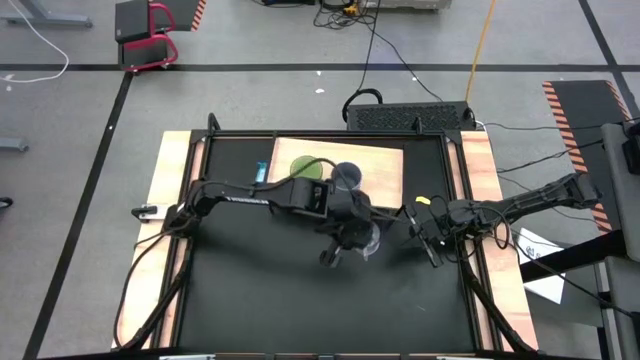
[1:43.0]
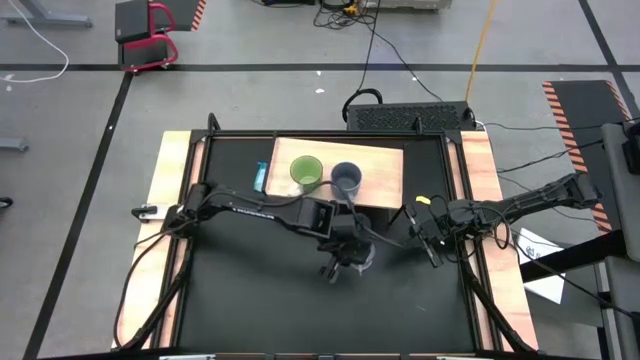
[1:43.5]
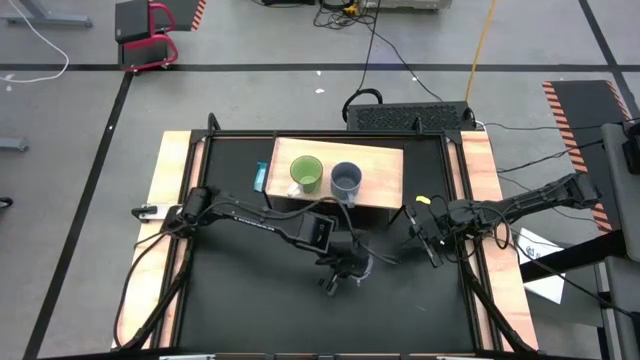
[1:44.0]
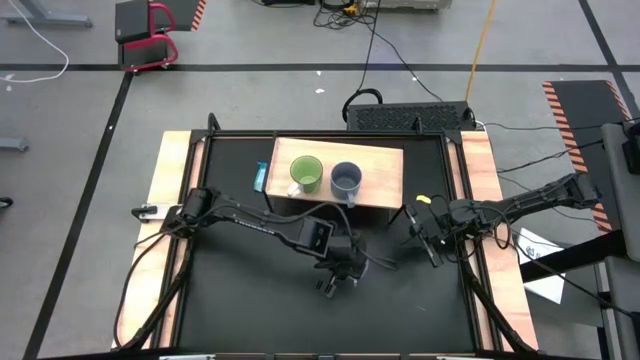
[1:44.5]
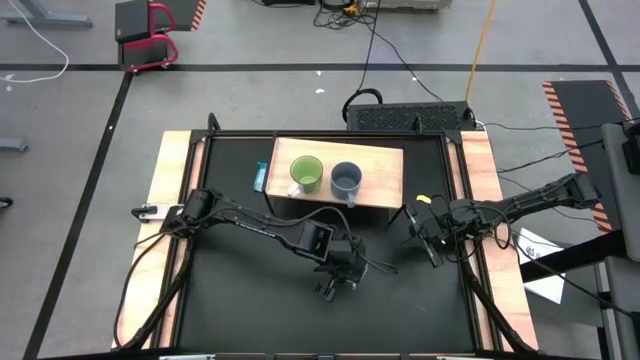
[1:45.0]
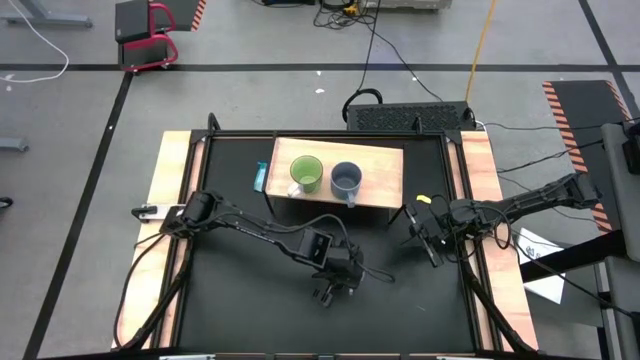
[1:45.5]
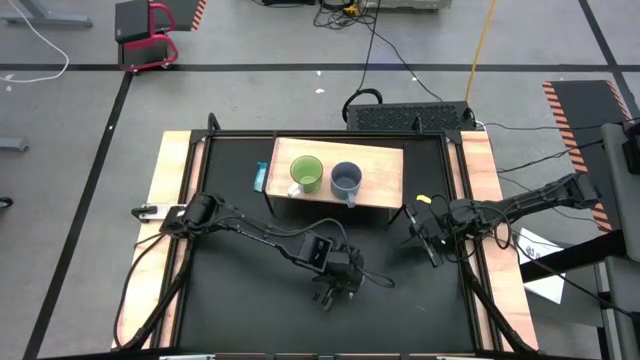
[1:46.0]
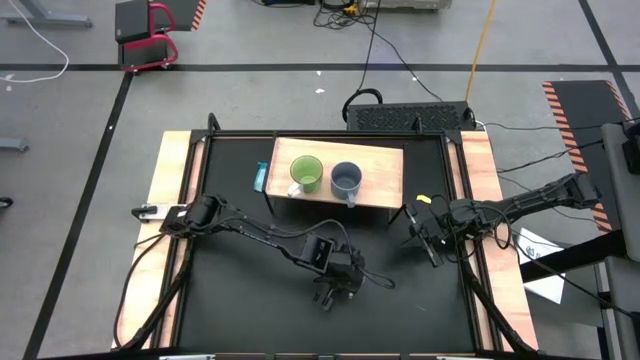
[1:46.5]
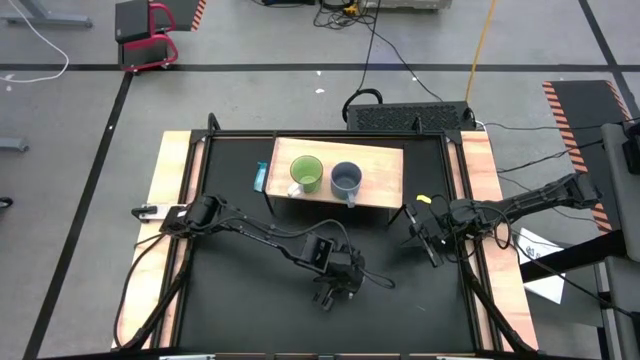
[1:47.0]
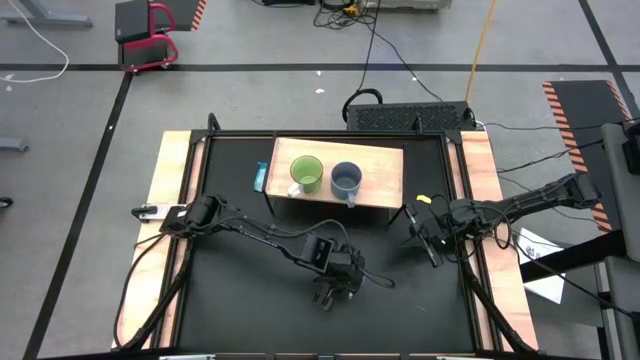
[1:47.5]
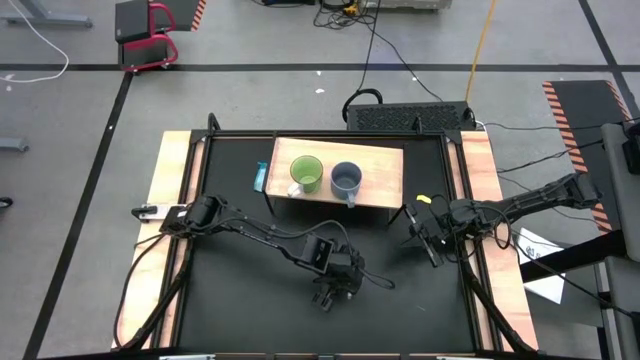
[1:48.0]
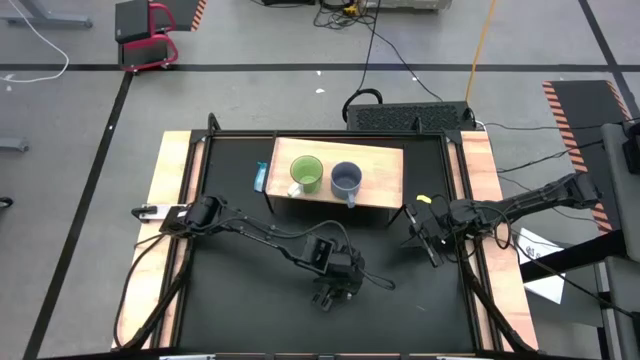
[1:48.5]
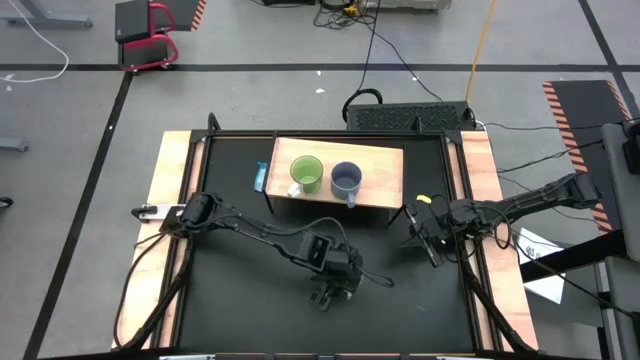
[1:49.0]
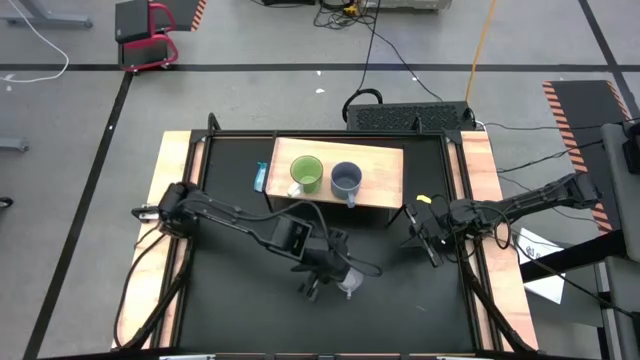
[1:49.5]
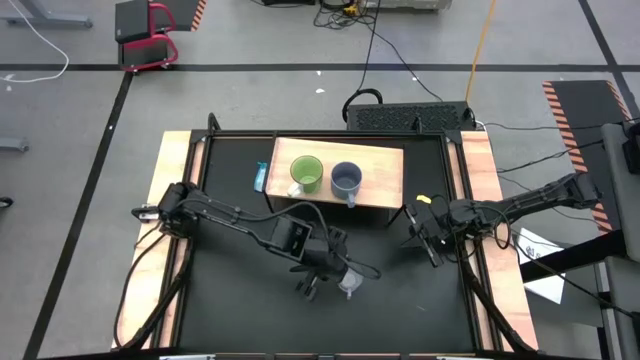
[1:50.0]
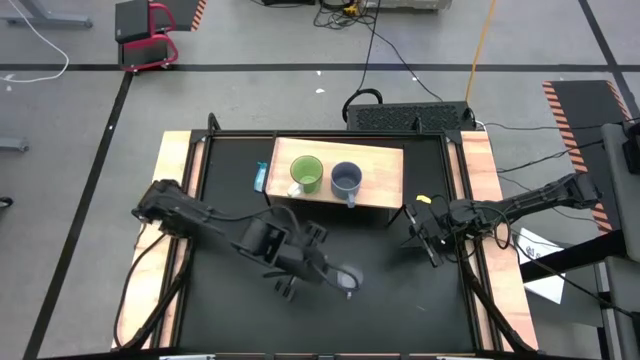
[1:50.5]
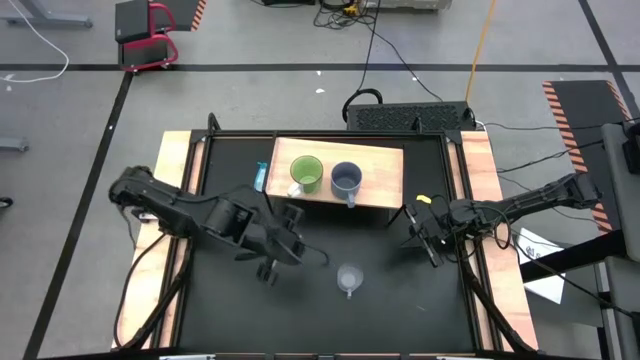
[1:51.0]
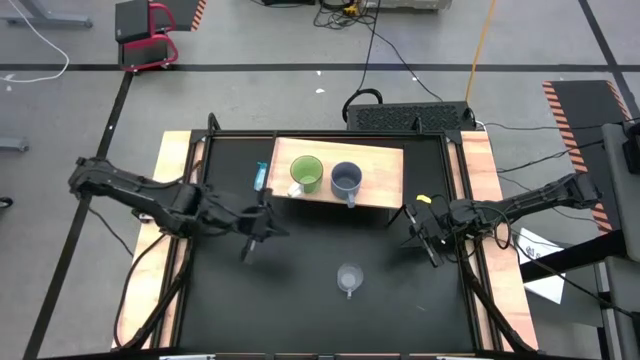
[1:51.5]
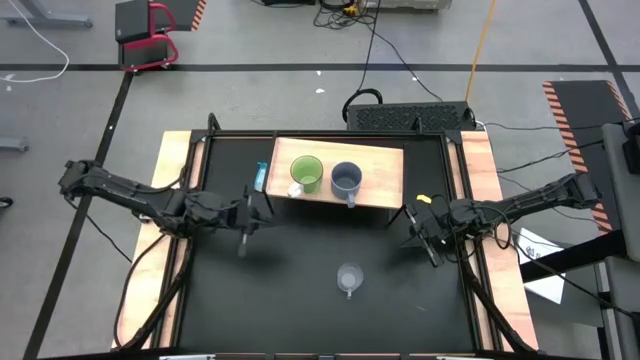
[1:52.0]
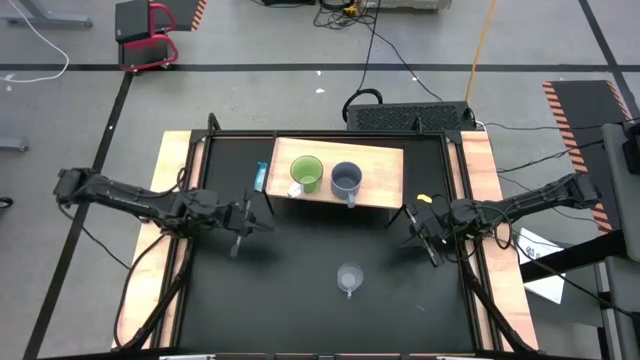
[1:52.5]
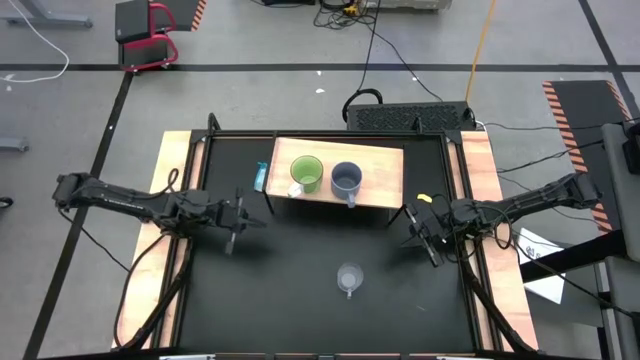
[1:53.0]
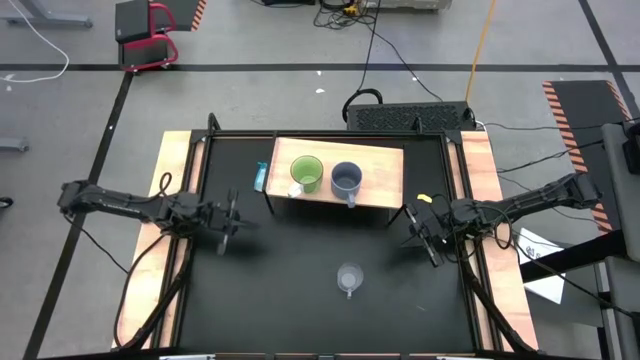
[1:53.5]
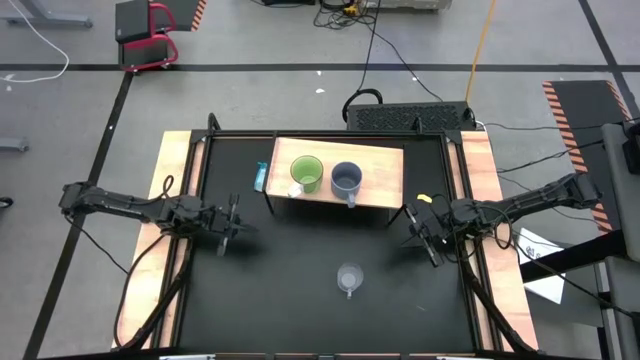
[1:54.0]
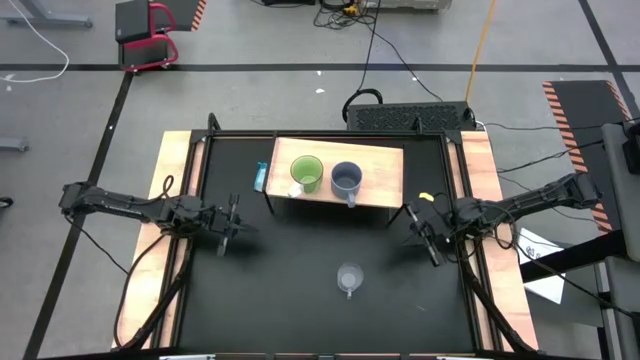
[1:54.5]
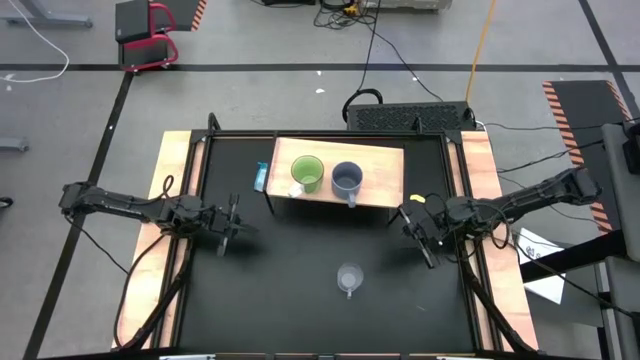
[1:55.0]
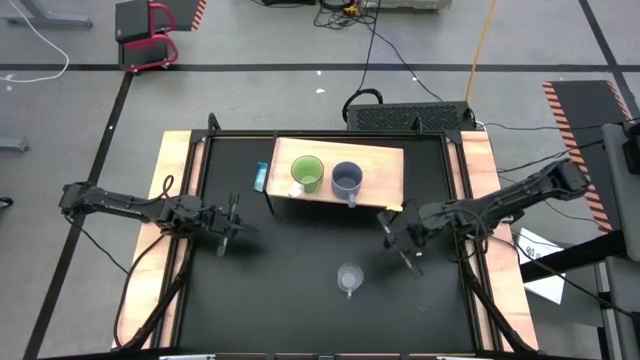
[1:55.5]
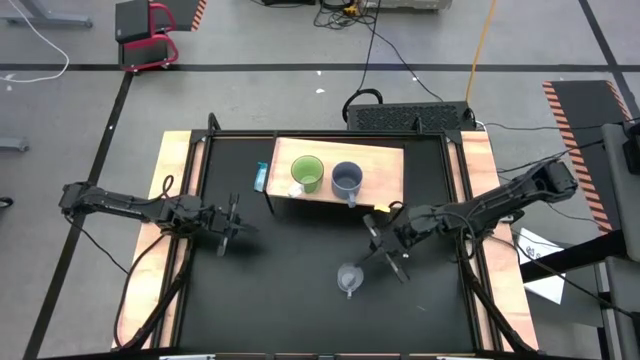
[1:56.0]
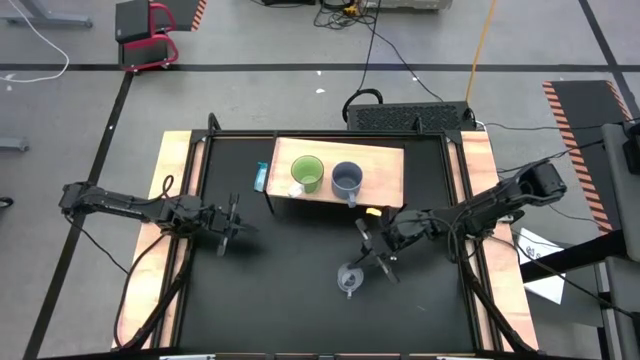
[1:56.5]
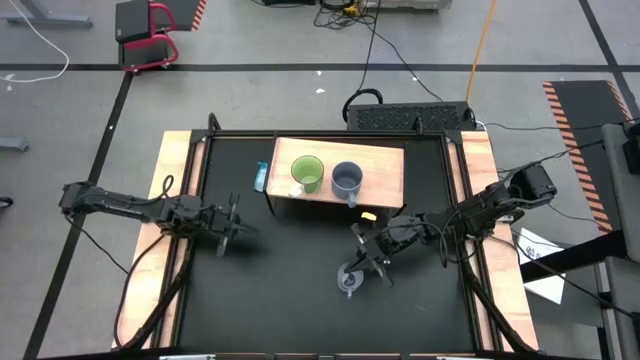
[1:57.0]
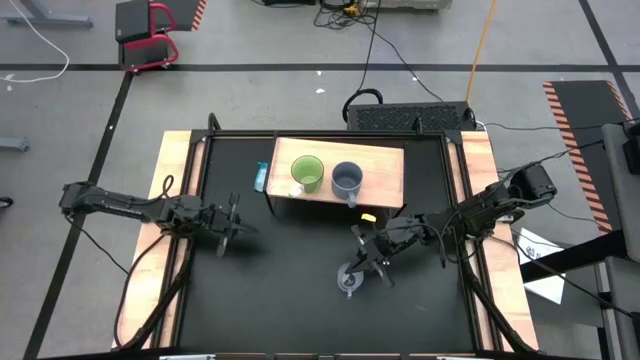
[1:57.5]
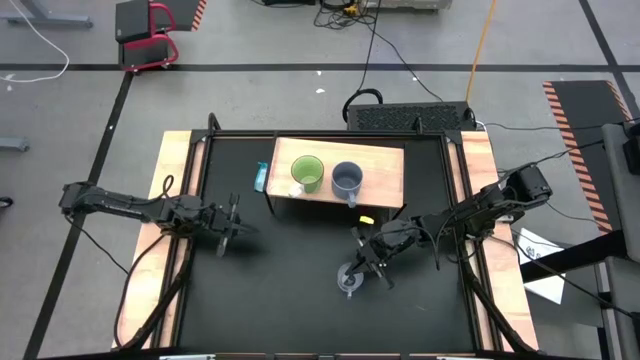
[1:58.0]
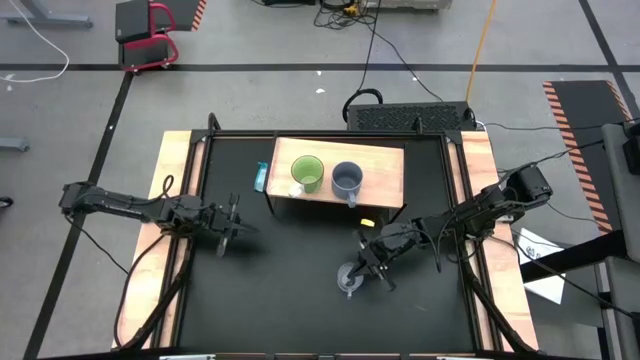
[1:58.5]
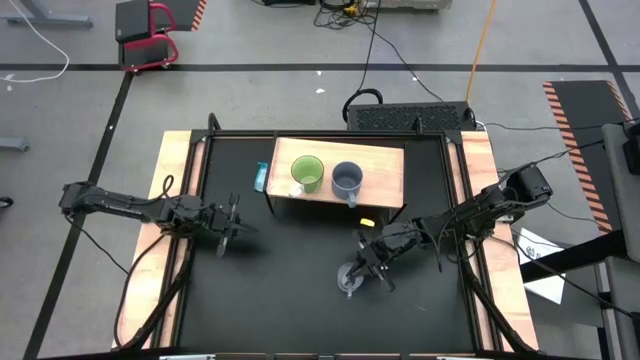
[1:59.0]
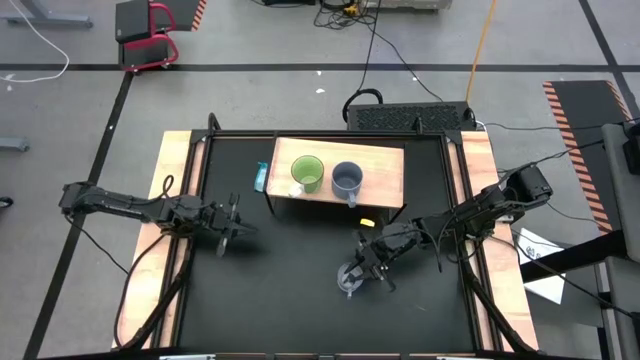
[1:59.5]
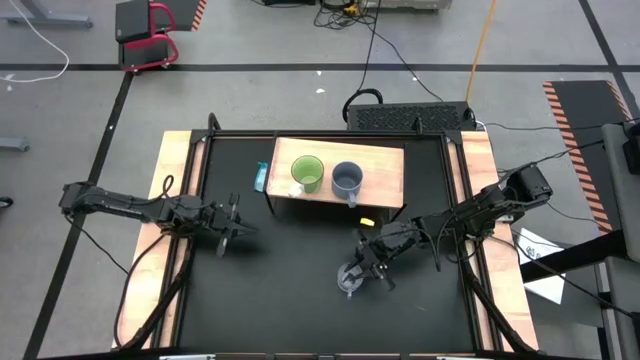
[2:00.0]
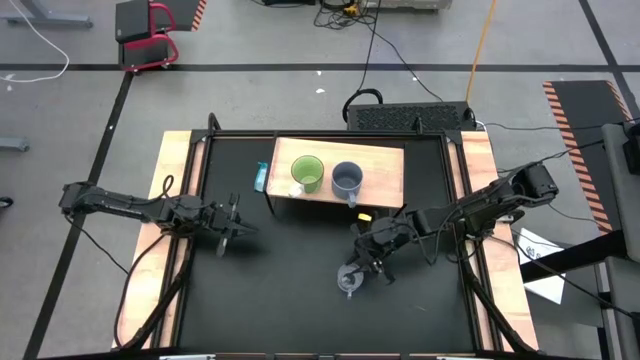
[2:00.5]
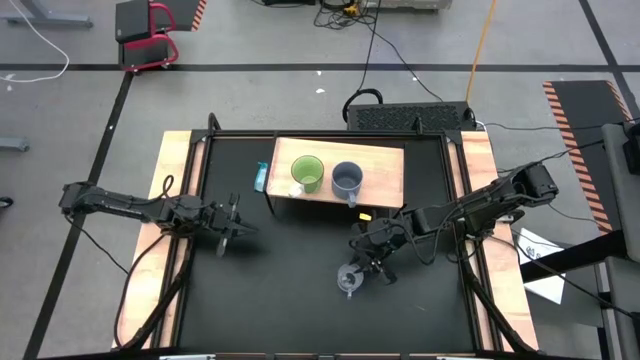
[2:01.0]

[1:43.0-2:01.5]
Task: Stack small to large cups/mugs on shelf
Put the transparent cup on the shelf
